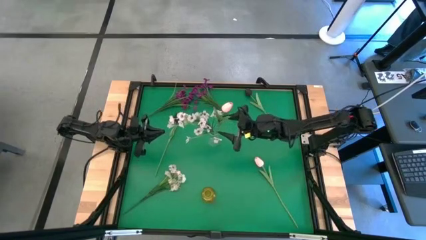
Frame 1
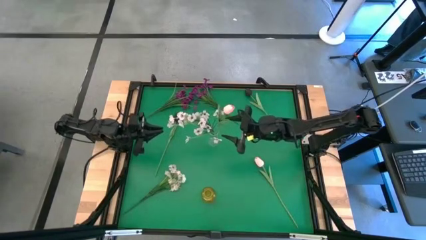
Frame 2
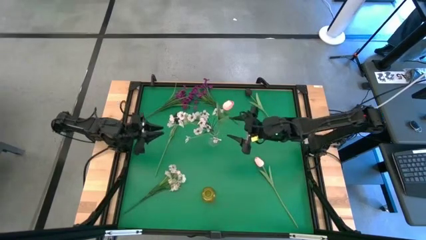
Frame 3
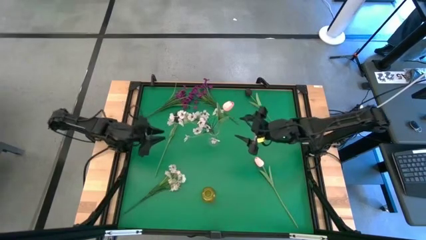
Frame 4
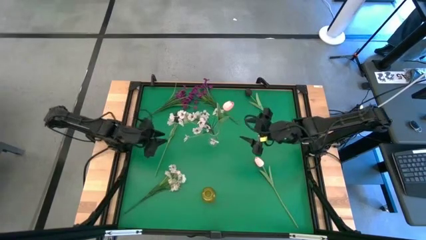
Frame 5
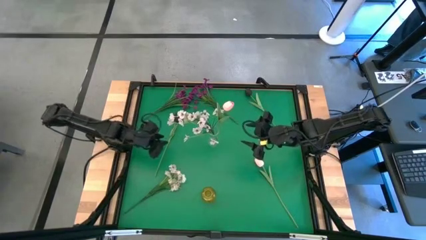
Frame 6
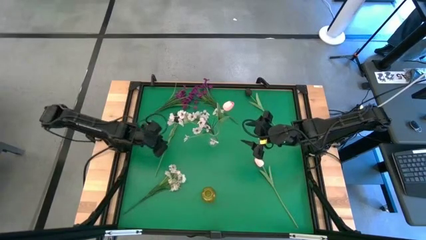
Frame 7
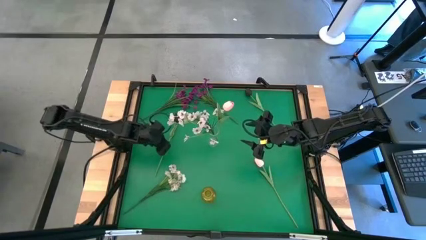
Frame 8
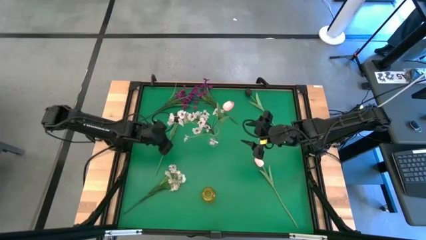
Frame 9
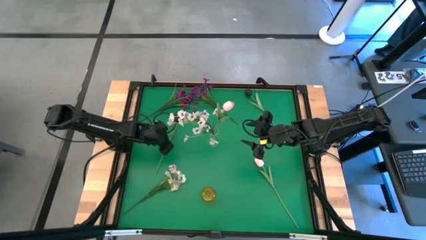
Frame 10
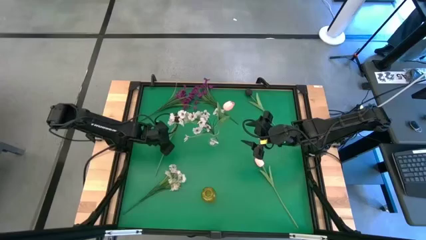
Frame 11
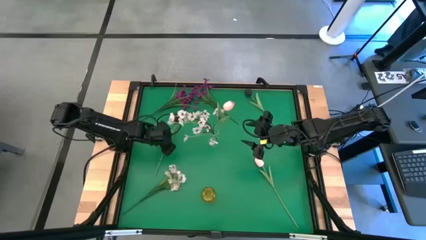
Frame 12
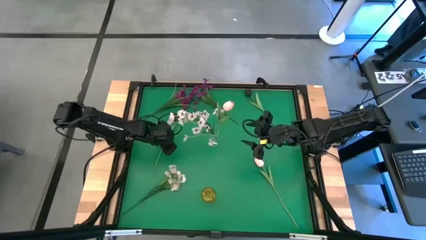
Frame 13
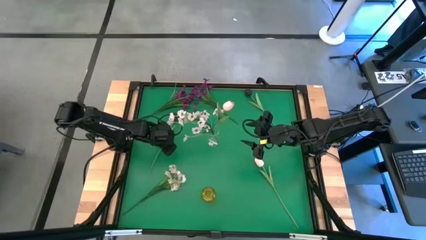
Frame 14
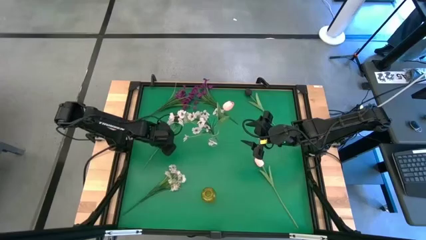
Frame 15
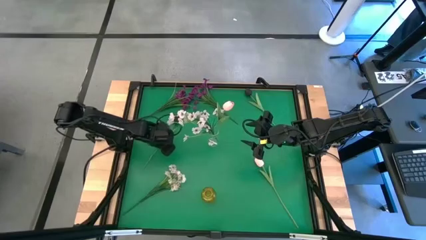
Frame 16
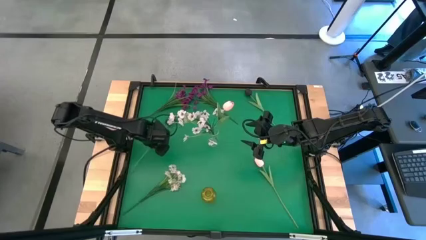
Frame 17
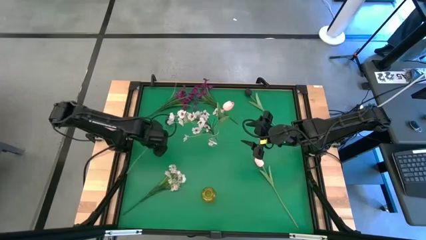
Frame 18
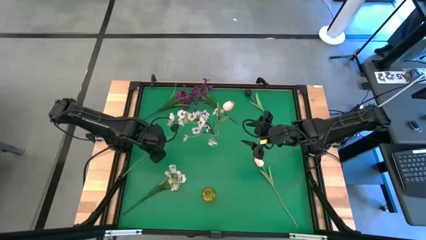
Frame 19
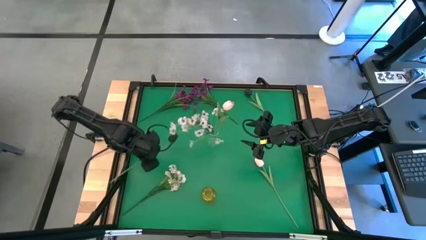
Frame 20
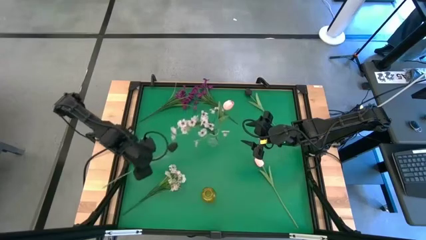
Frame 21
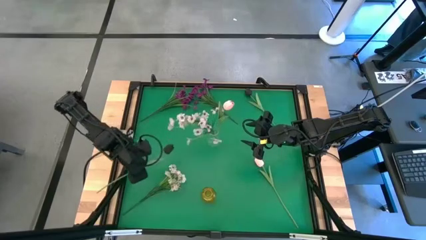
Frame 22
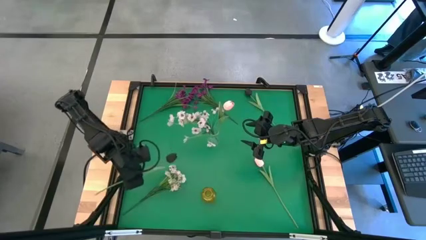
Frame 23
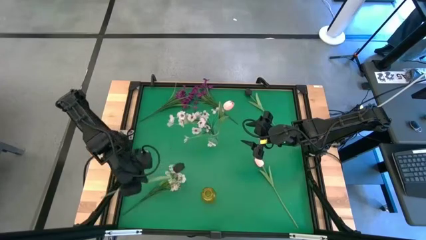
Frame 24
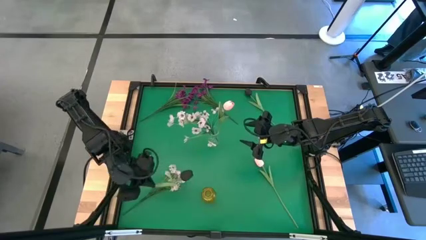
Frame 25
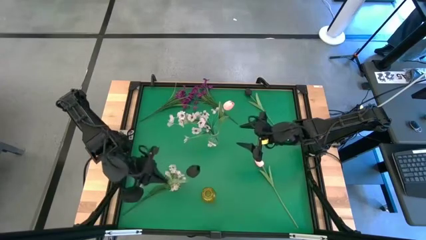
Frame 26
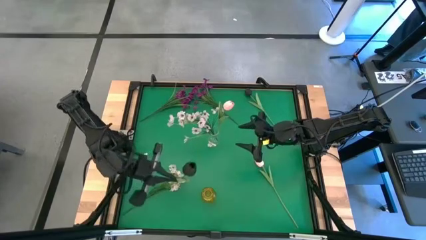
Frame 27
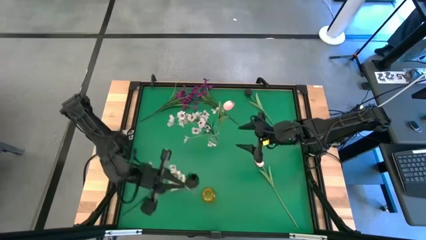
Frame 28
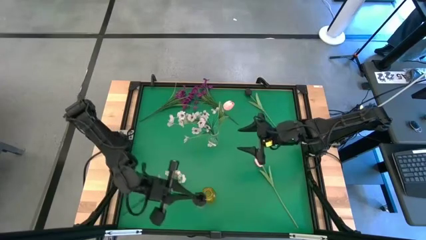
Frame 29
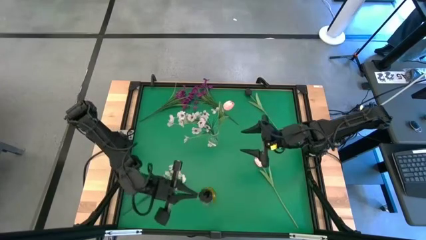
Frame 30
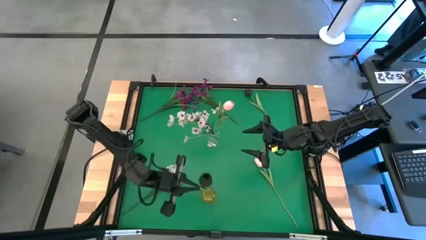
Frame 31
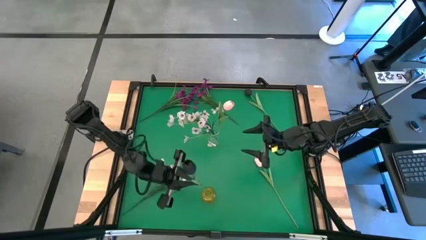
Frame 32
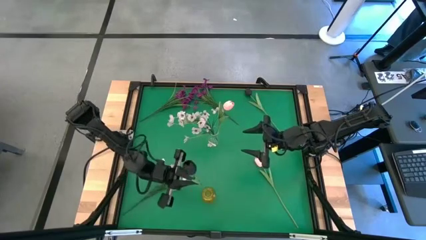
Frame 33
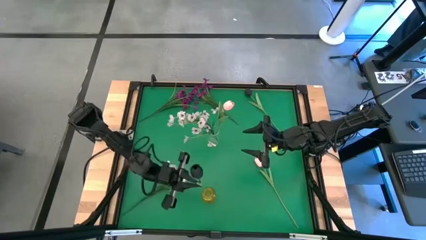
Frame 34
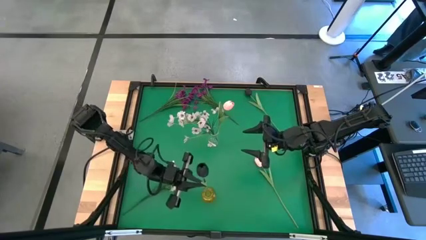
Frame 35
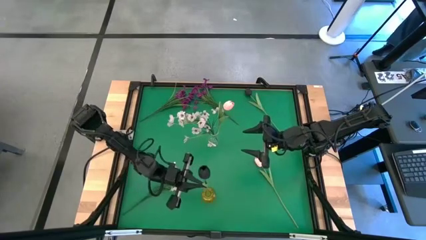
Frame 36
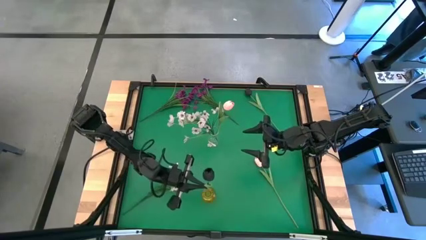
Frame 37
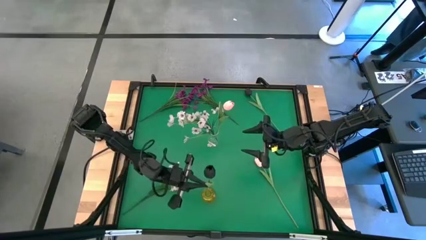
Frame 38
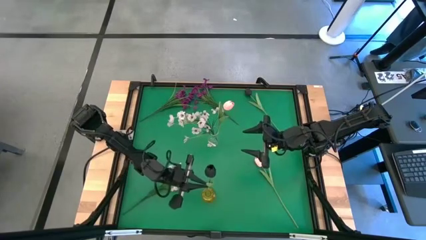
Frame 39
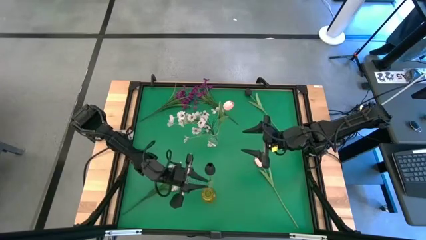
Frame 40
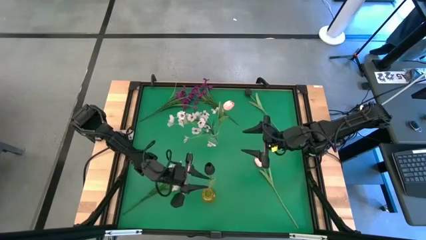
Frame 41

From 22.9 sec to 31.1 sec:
Task: Sort flowers into vase by color
Put the middle left black tulip flower into the yellow crystal vase

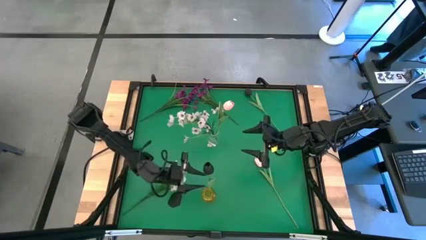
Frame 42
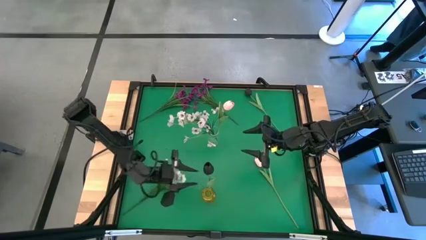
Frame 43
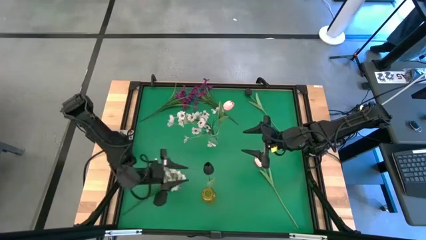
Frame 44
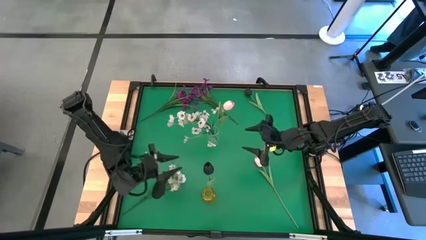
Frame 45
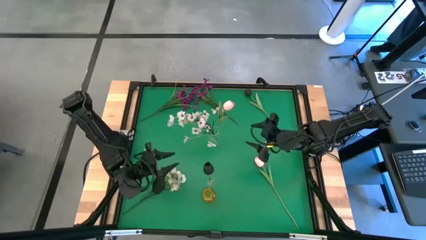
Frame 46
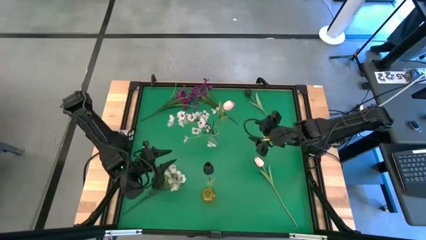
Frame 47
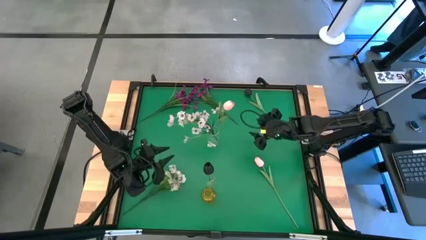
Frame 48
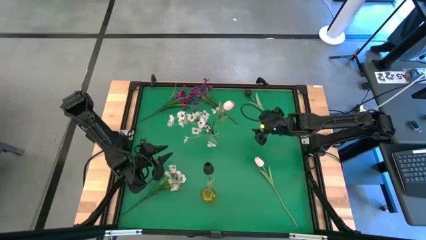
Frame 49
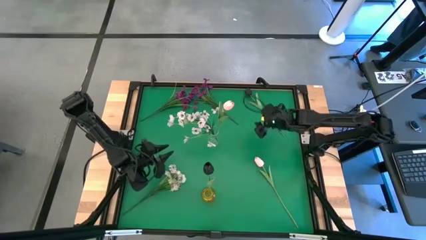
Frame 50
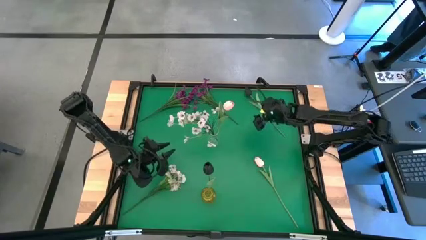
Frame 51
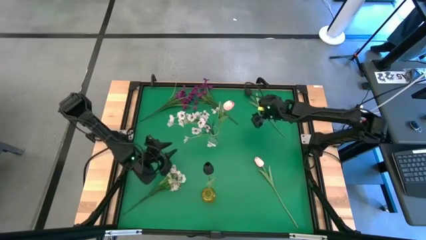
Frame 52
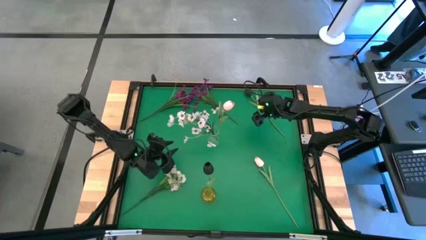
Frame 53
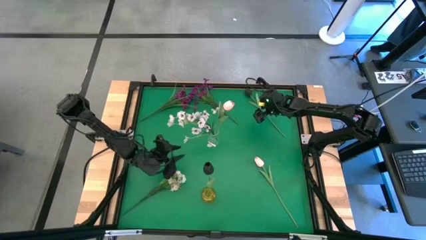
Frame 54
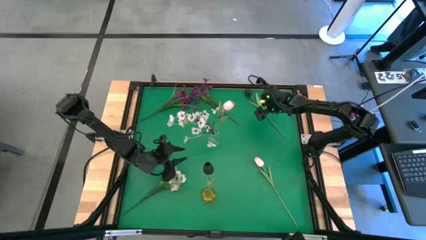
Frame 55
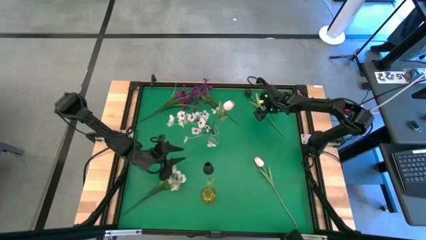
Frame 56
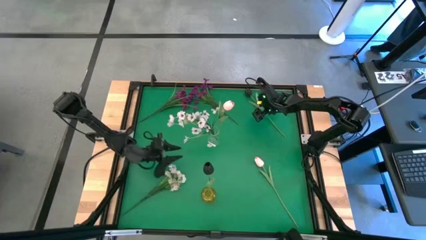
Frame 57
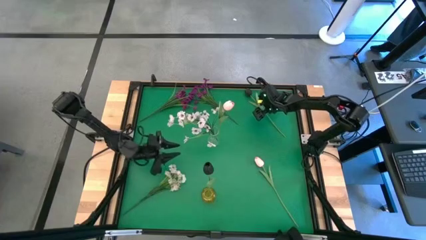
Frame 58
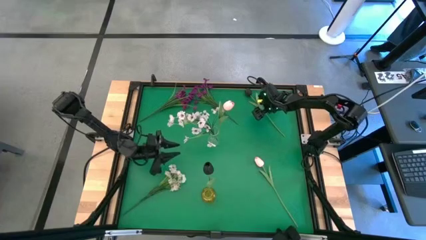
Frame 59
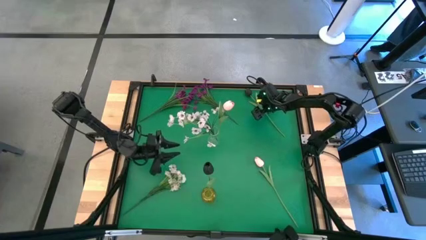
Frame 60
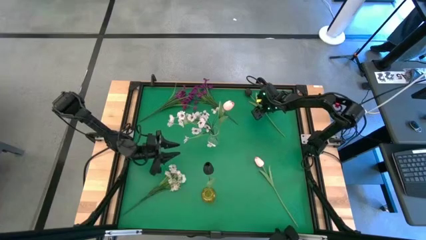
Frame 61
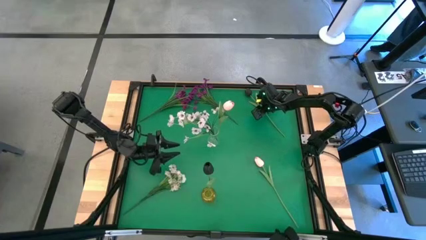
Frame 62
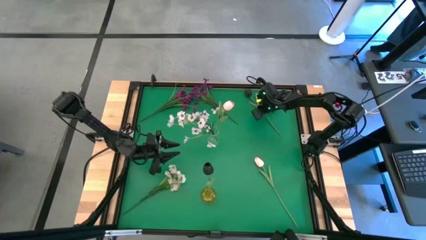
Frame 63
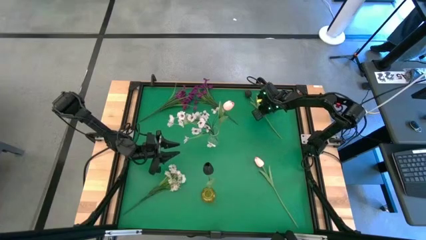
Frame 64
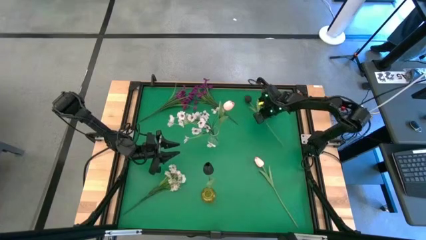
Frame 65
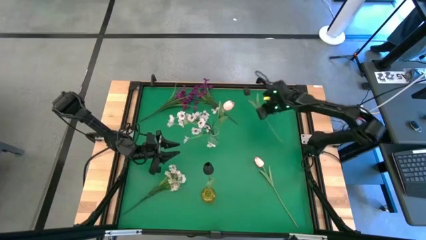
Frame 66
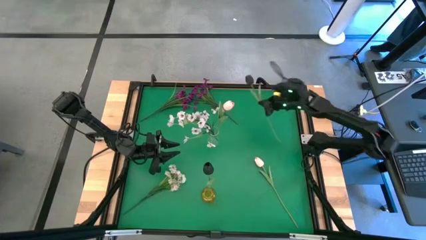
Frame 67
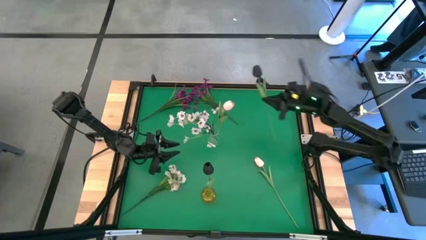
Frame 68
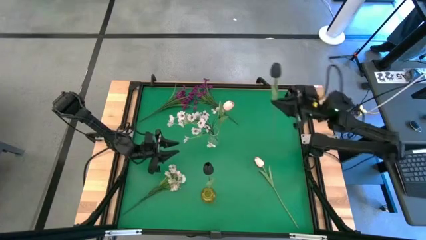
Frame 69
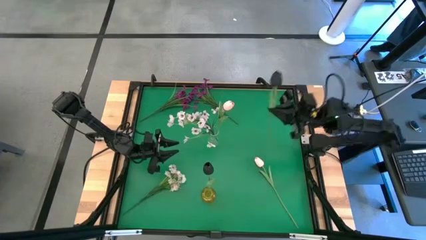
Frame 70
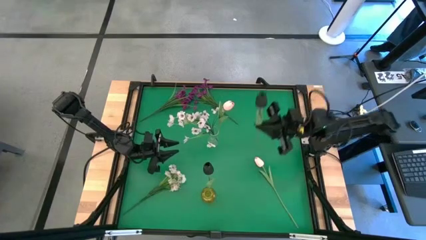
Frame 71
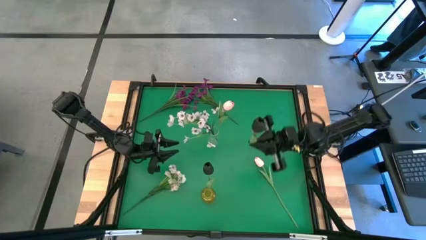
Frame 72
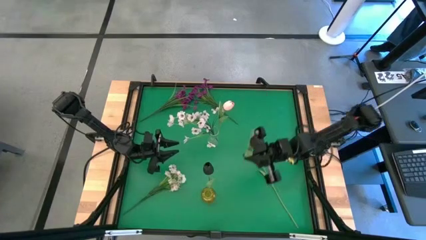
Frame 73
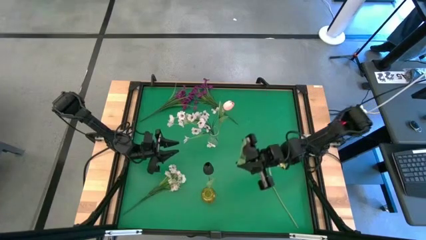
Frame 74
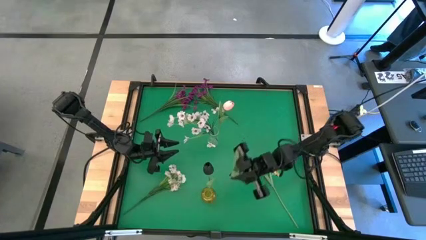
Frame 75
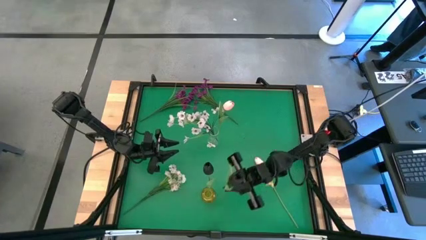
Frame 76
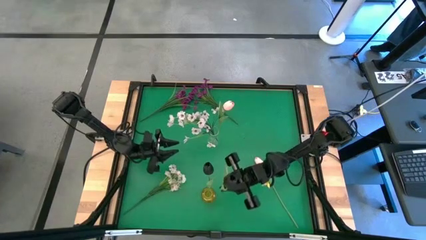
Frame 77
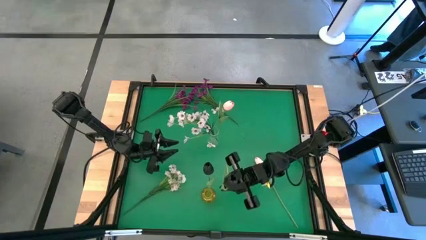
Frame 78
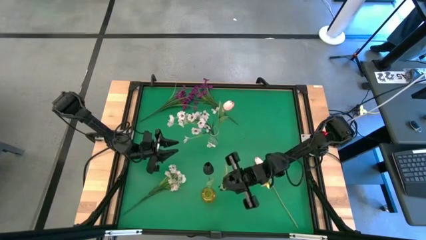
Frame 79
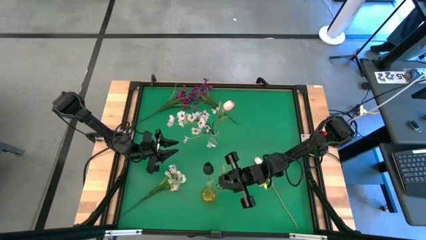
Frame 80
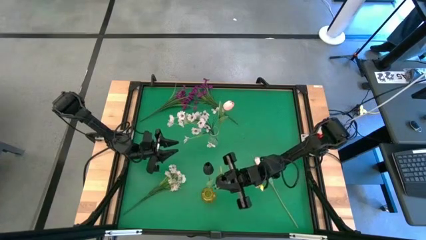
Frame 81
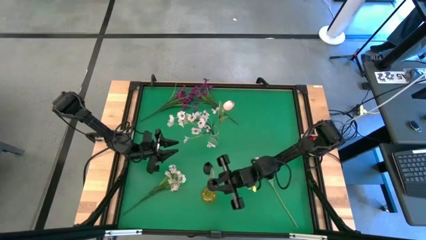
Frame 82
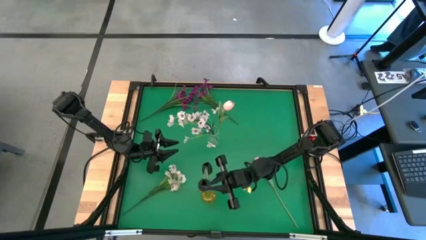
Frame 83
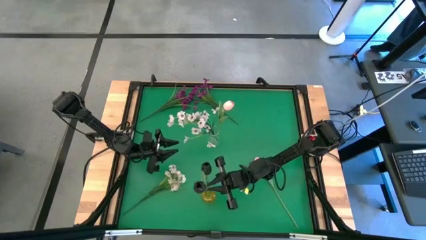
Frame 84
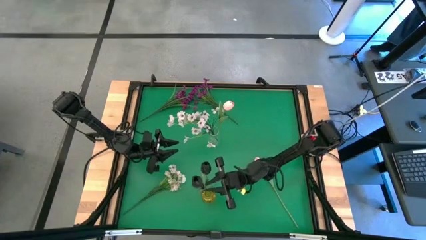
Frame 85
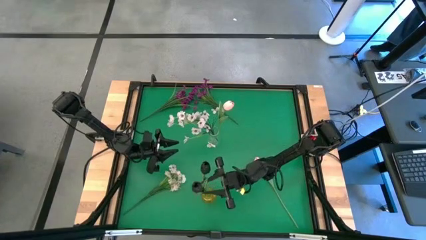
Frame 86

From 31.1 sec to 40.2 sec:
Put the black tulip flower into the yellow crystal vase
